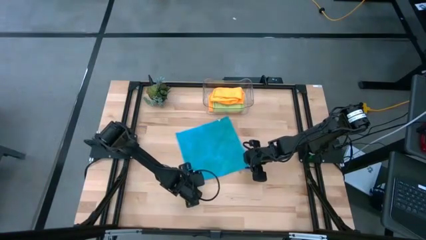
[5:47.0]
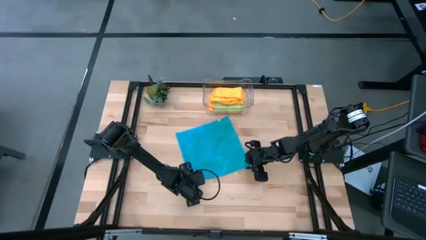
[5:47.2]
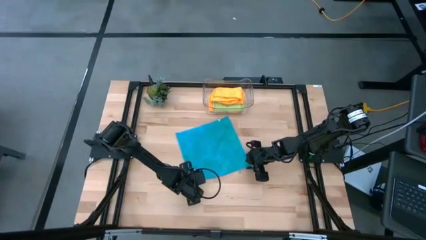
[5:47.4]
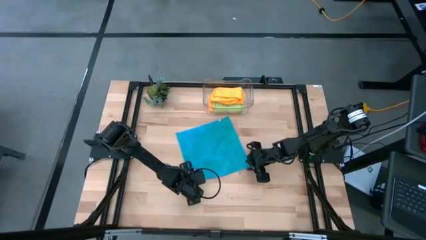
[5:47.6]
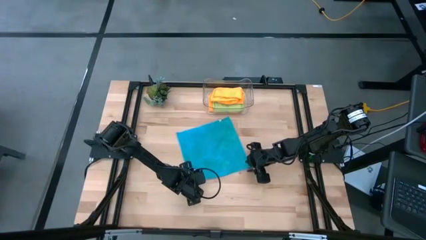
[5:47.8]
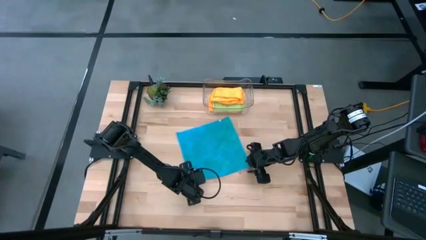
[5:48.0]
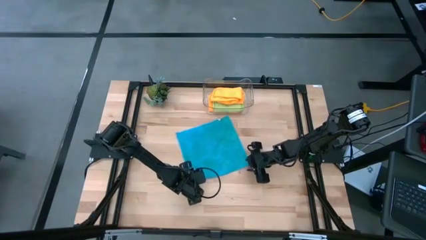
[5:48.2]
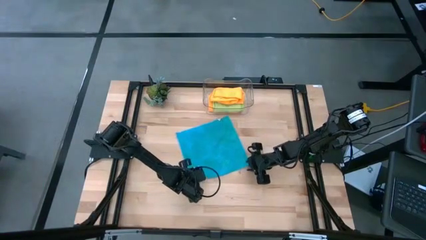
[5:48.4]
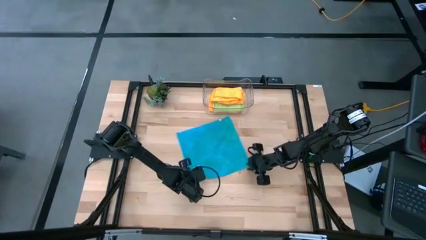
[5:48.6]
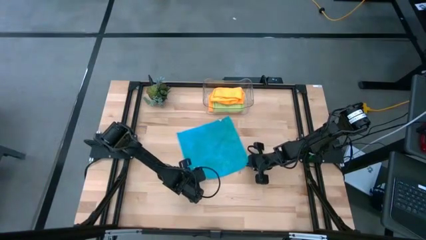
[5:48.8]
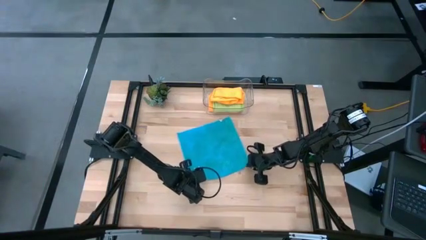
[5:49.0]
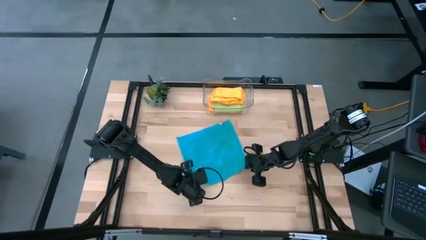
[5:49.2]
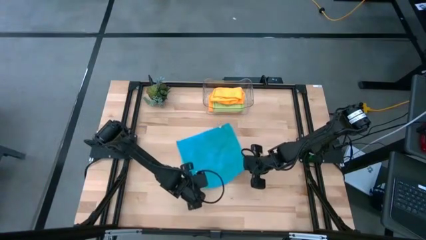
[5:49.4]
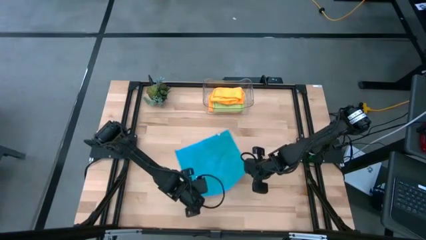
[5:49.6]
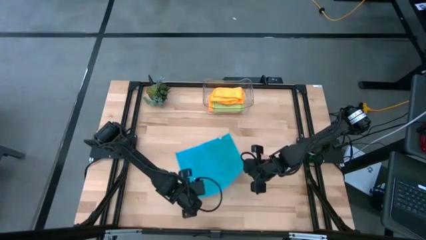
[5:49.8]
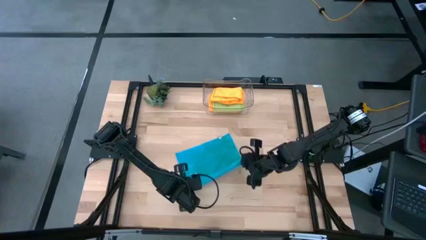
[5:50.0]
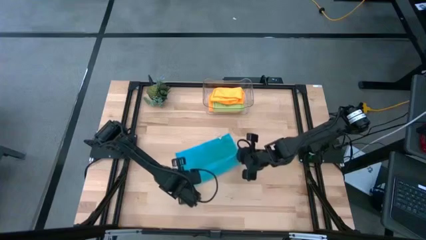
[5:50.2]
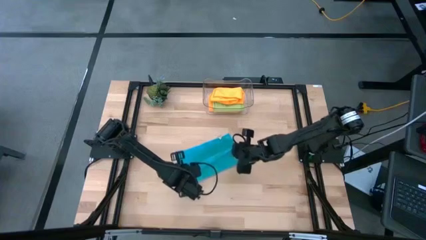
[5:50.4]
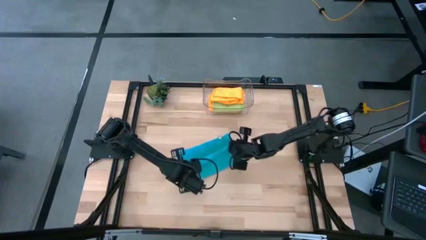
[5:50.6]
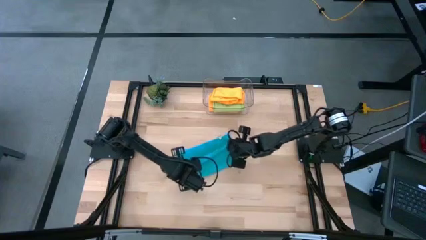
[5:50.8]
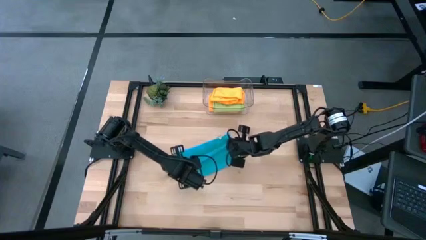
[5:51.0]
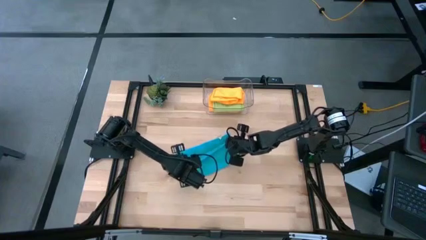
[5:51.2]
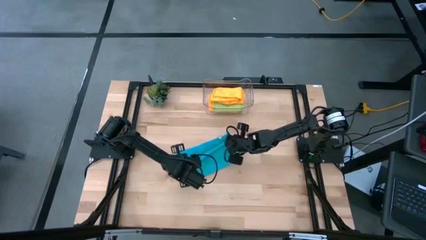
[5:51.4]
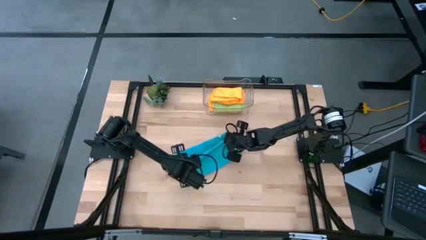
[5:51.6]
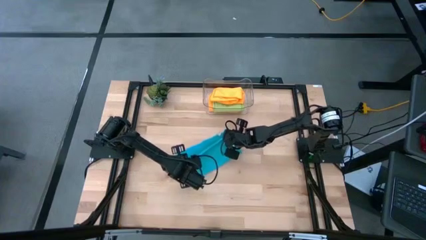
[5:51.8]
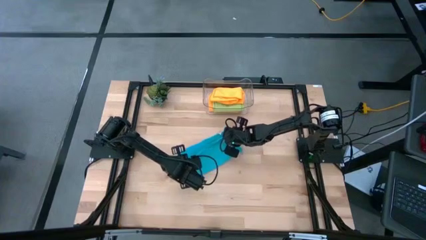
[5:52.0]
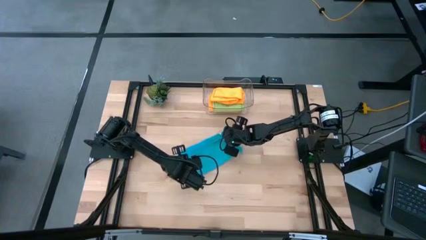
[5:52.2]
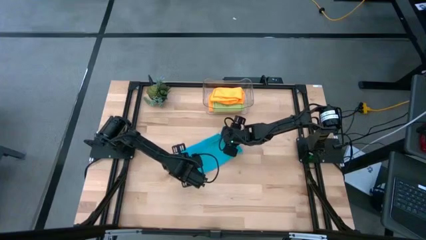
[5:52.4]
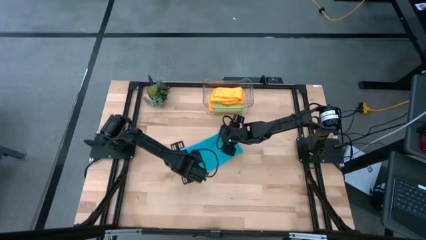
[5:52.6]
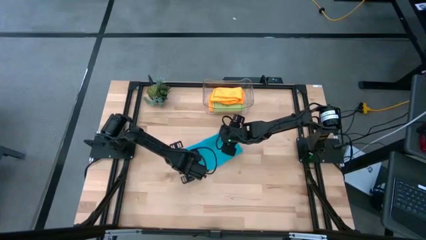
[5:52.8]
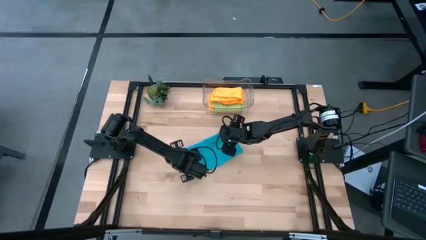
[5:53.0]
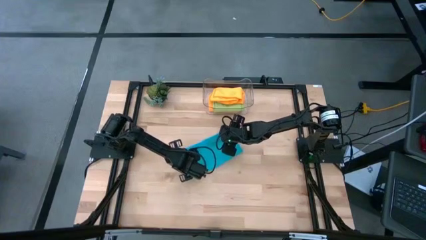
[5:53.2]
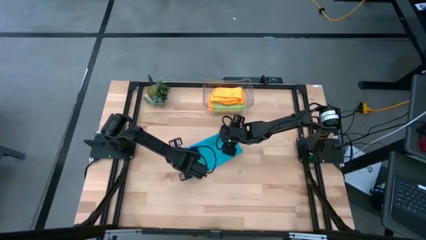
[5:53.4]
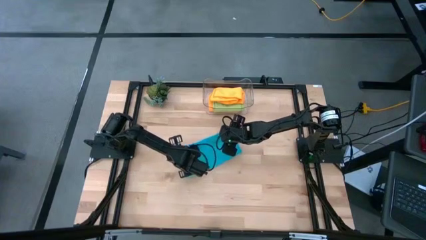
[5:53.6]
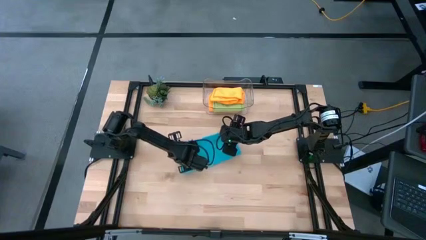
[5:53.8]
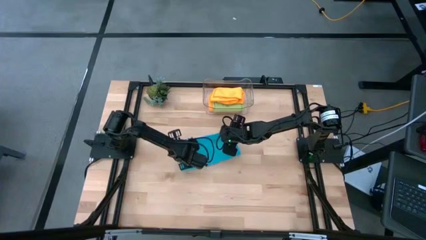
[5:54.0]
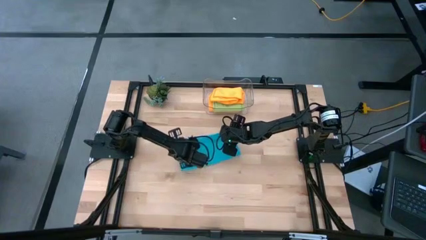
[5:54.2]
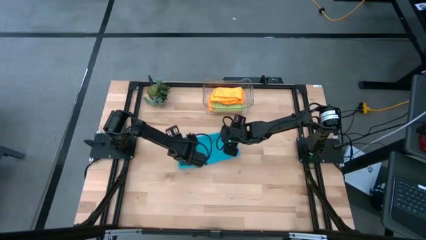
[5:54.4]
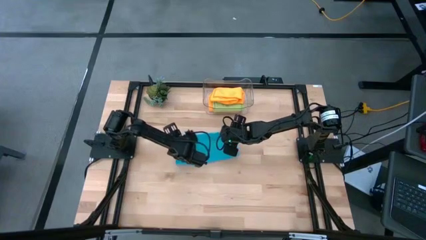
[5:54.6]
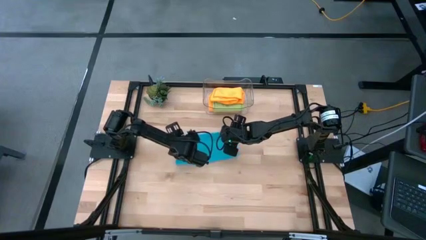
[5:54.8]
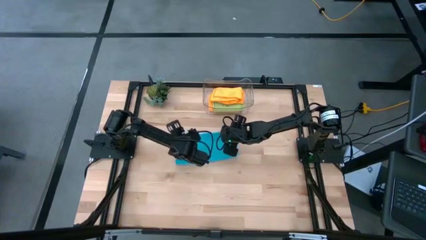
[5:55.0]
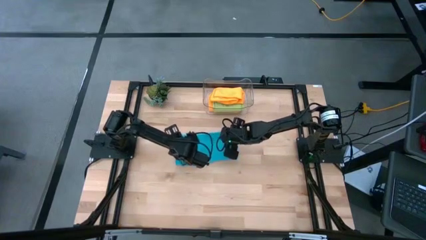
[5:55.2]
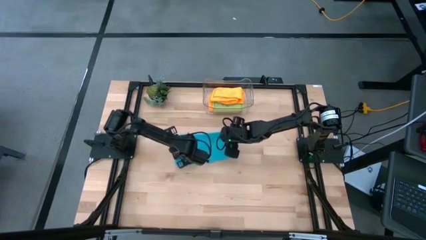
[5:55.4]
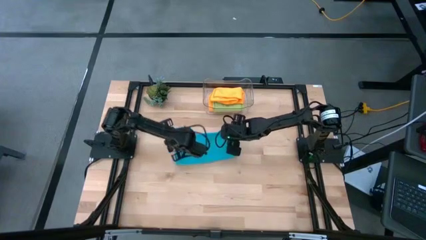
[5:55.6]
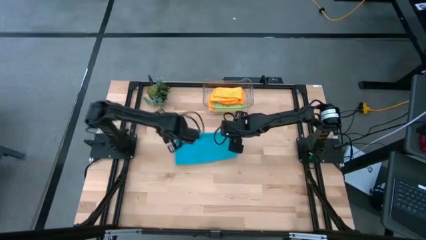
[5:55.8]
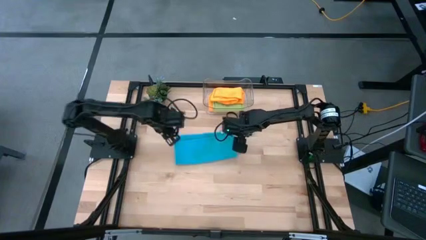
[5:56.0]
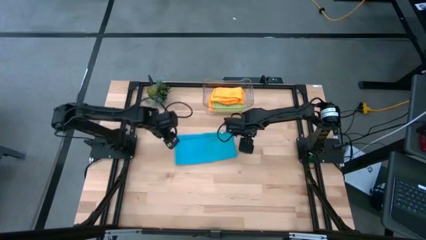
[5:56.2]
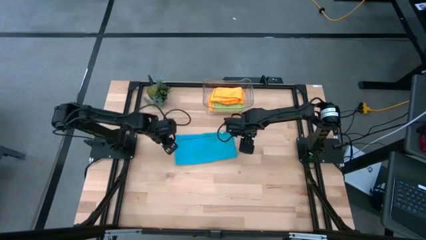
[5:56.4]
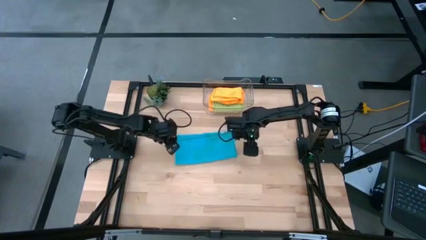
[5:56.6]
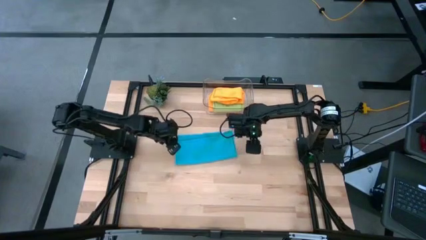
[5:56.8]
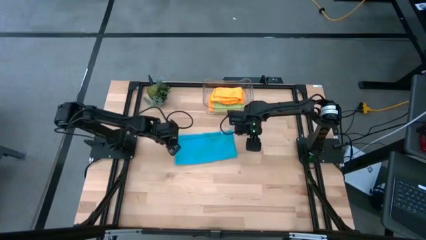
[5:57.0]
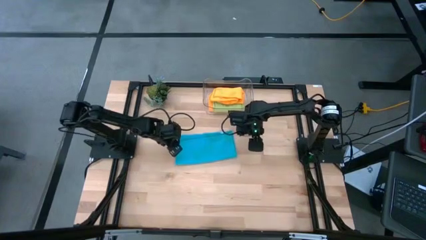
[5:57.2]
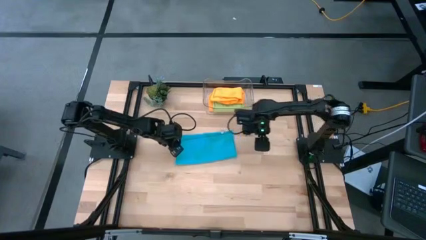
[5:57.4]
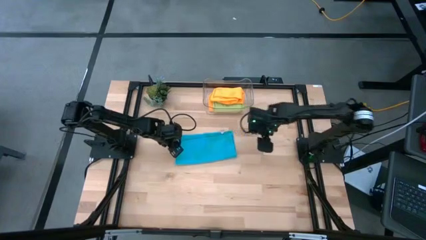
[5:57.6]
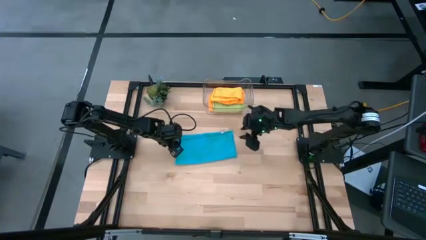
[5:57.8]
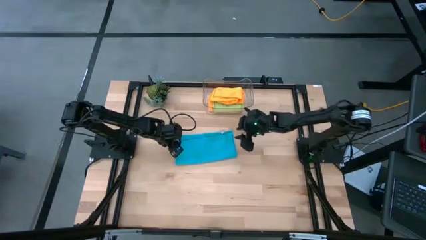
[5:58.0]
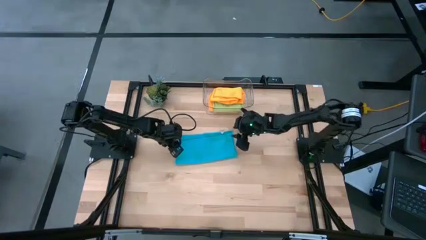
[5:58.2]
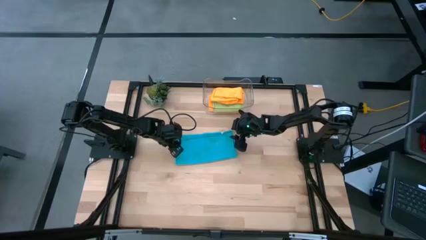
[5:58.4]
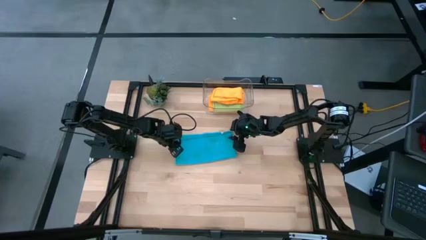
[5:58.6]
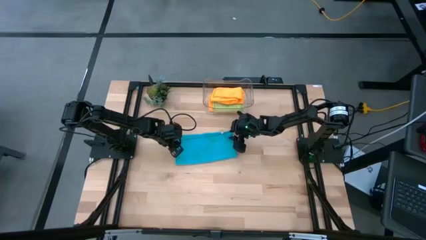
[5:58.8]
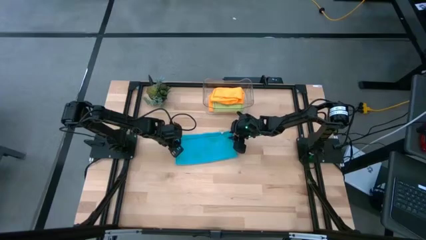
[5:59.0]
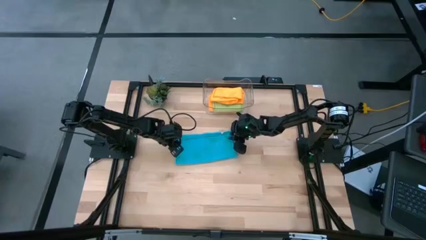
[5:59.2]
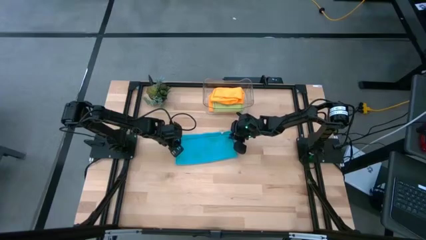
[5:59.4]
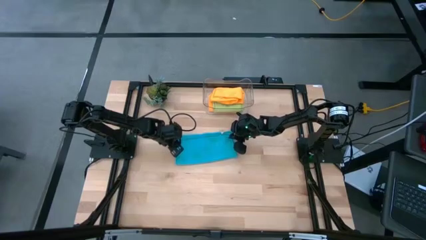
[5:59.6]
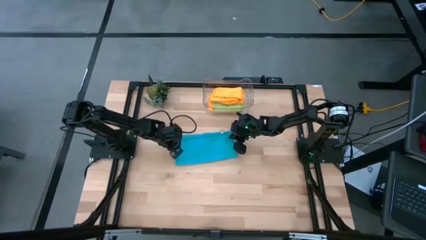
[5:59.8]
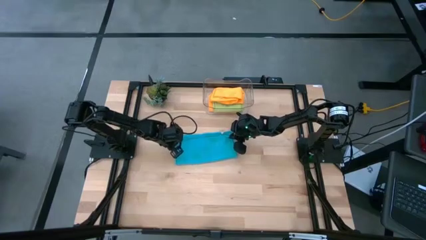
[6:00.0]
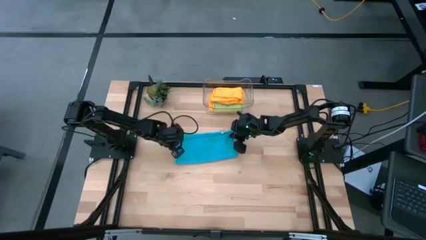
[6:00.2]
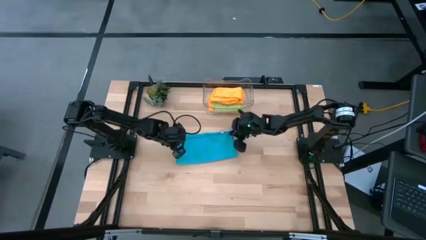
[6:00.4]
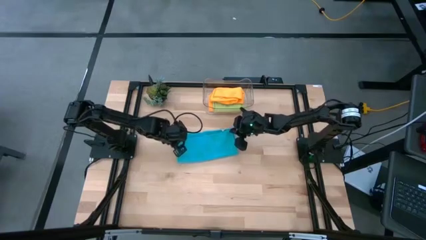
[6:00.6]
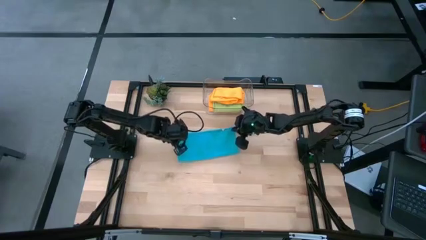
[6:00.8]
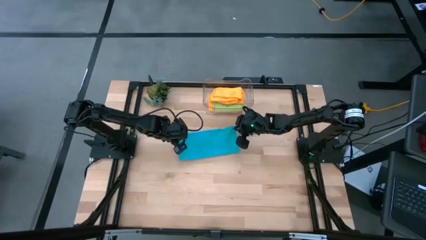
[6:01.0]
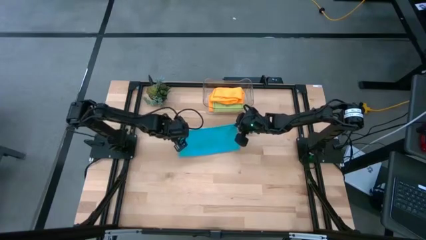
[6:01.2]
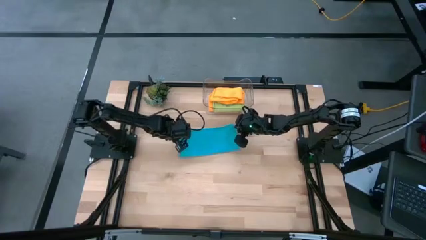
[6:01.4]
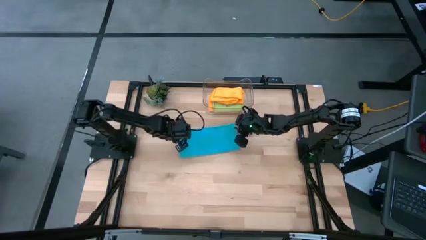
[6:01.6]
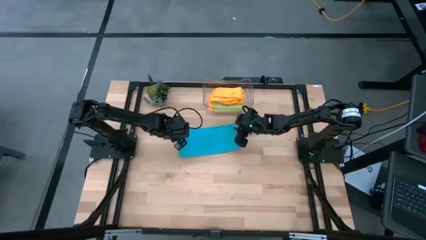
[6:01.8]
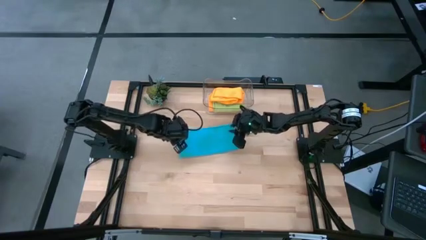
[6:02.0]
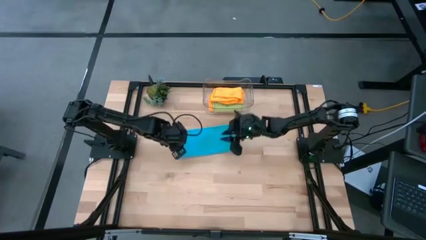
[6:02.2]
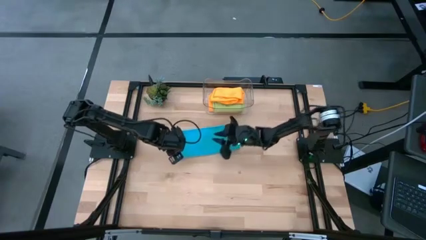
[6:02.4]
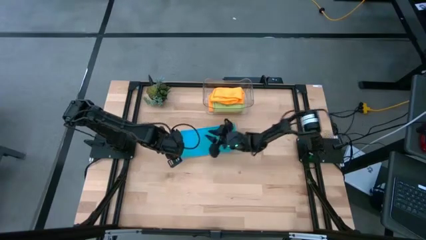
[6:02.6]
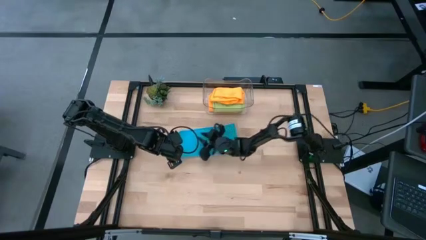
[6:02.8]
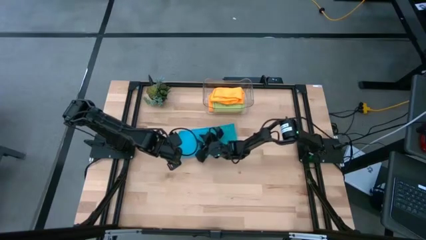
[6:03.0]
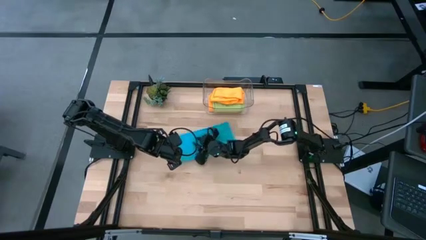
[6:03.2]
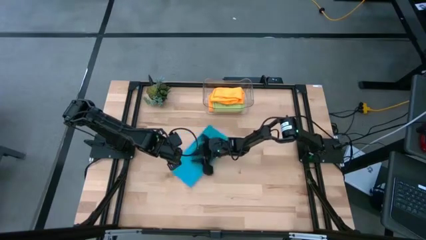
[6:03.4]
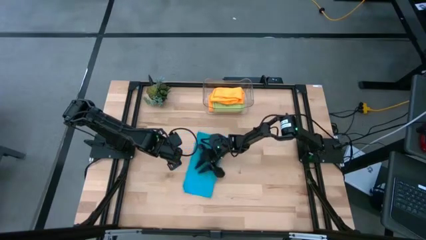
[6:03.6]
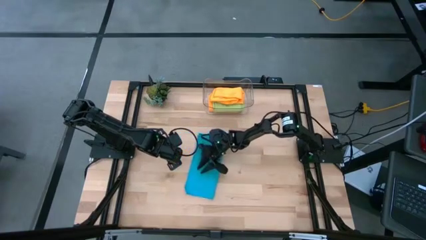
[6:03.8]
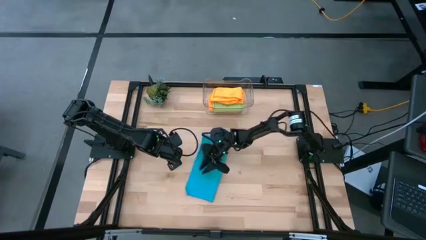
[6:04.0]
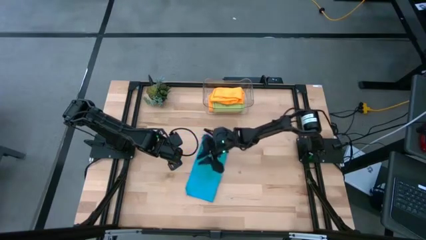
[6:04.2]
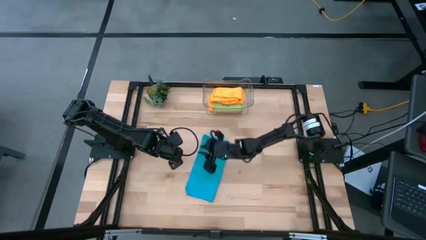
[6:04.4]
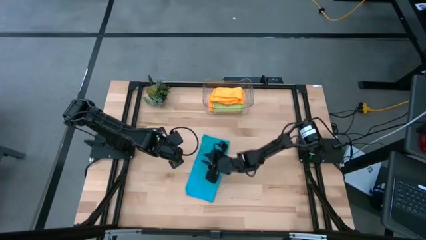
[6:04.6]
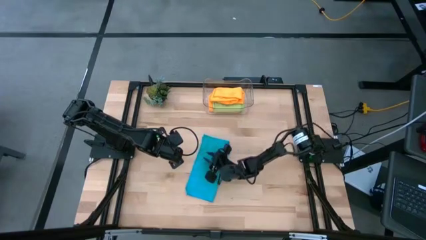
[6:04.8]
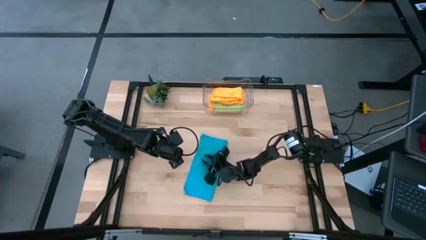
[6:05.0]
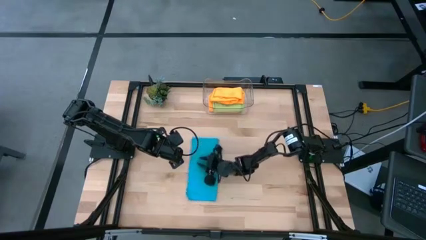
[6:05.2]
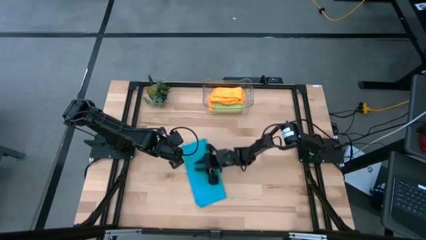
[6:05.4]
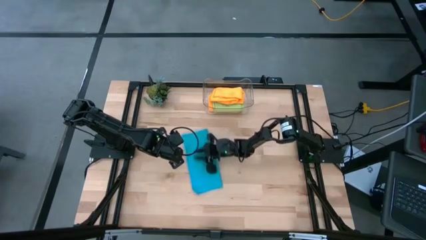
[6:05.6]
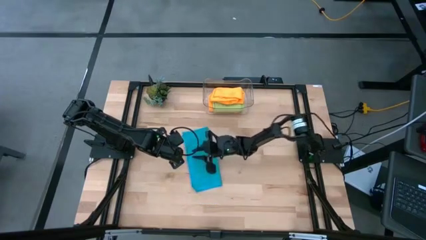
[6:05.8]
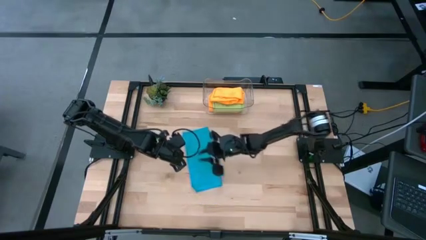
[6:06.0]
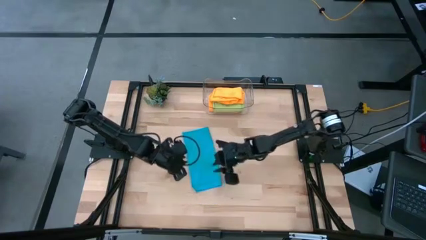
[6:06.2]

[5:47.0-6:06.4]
Task: Fold microfiber towels
Fold the blue microfiber cloth
